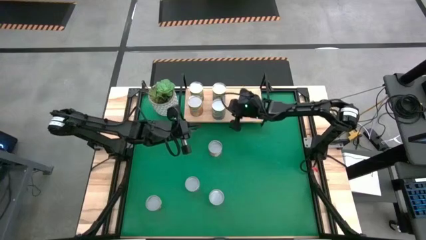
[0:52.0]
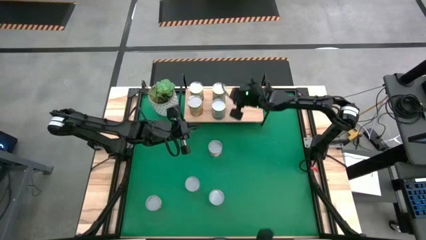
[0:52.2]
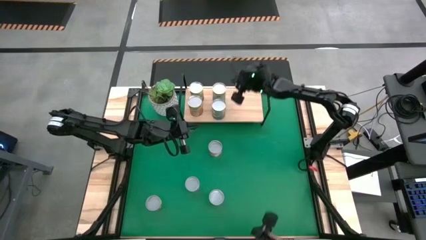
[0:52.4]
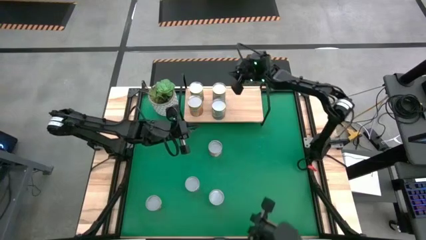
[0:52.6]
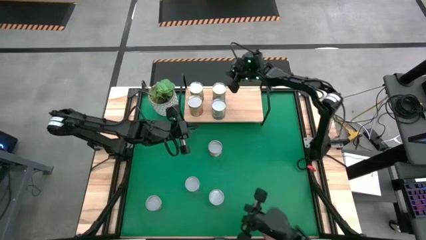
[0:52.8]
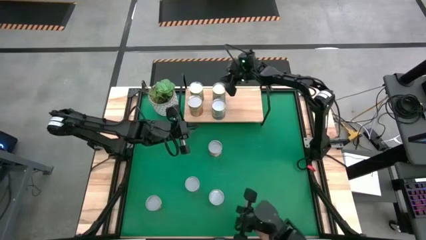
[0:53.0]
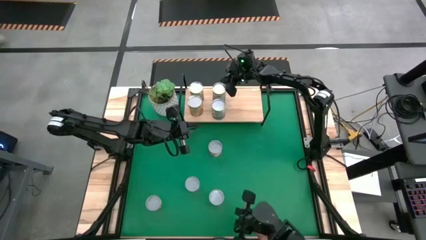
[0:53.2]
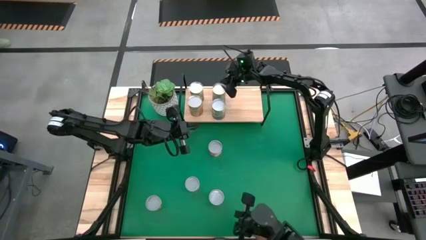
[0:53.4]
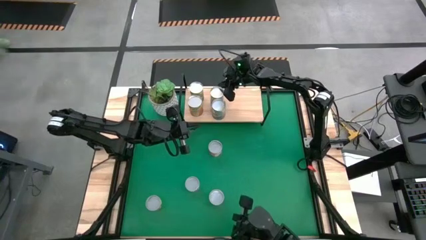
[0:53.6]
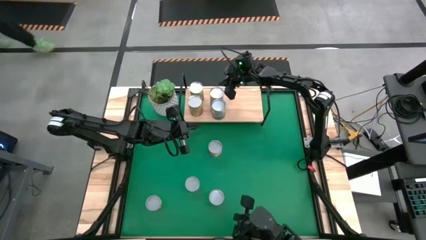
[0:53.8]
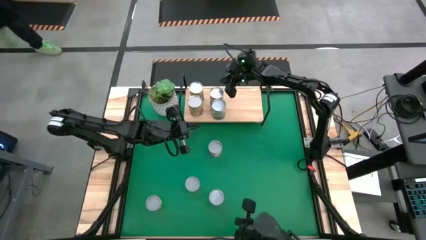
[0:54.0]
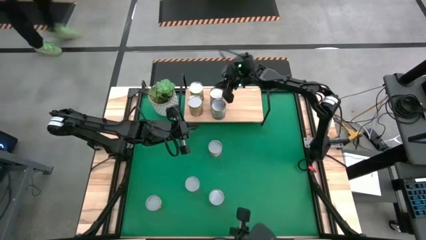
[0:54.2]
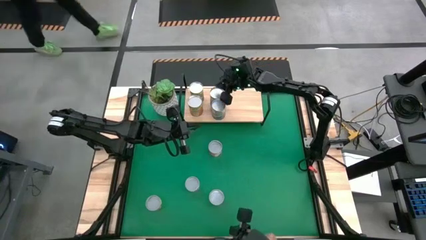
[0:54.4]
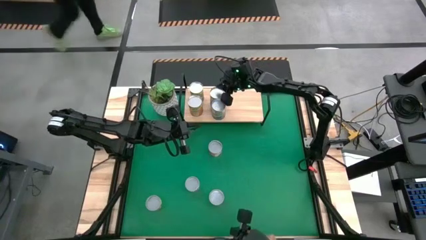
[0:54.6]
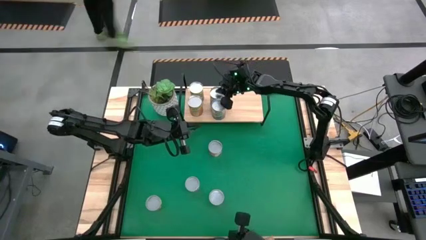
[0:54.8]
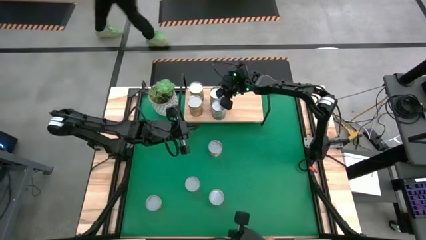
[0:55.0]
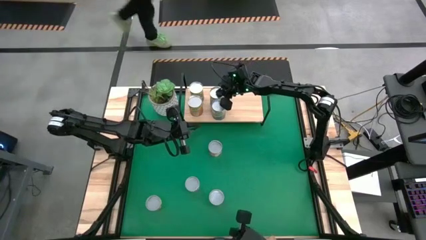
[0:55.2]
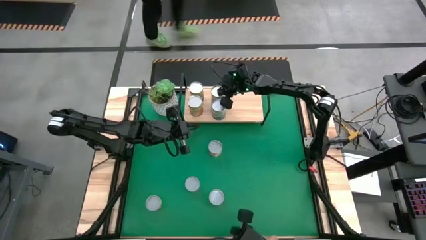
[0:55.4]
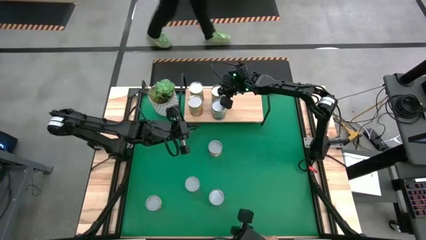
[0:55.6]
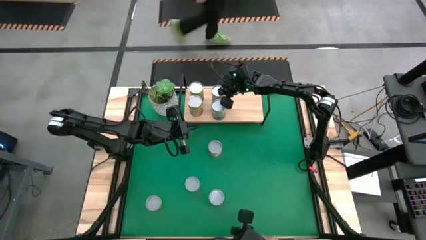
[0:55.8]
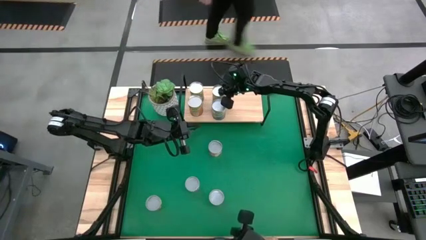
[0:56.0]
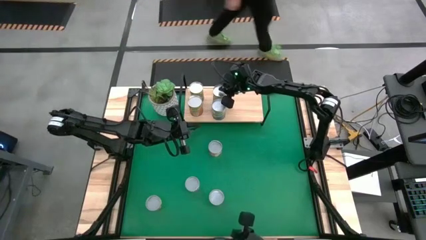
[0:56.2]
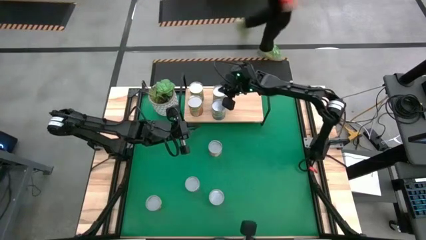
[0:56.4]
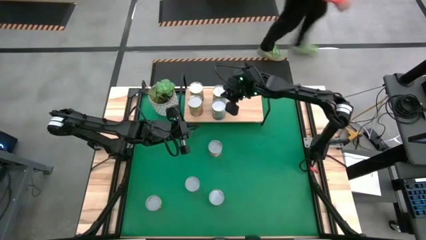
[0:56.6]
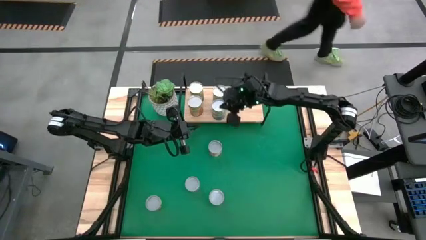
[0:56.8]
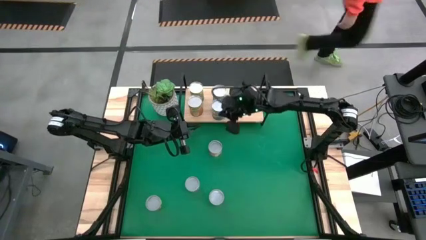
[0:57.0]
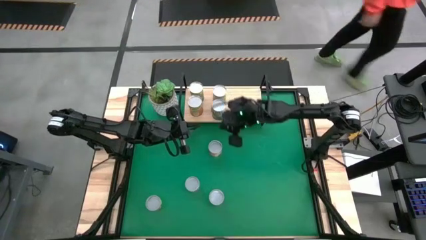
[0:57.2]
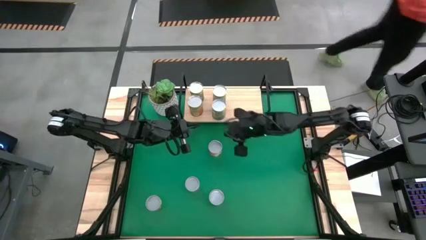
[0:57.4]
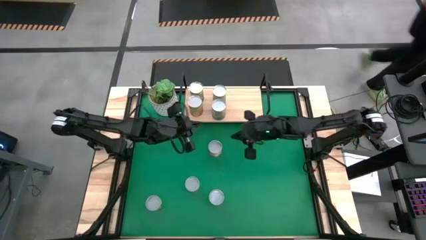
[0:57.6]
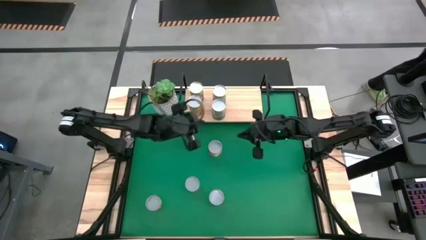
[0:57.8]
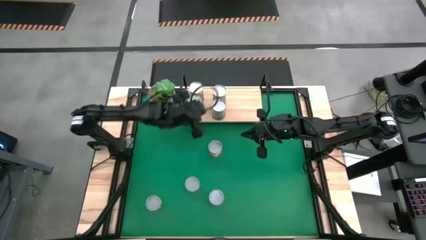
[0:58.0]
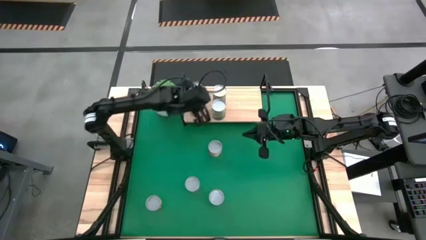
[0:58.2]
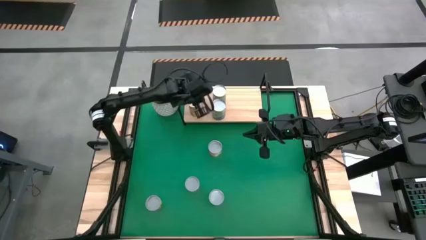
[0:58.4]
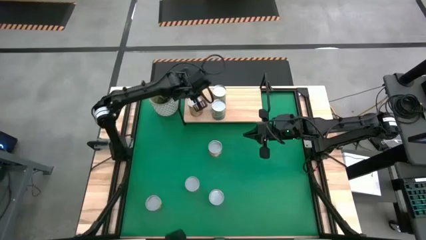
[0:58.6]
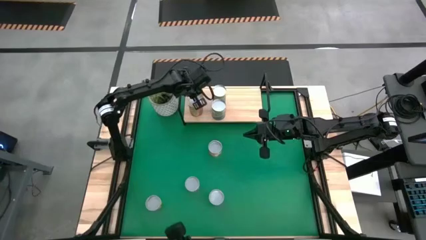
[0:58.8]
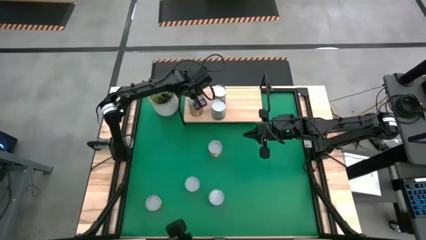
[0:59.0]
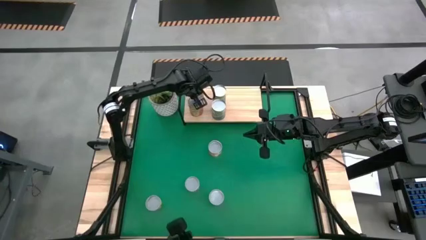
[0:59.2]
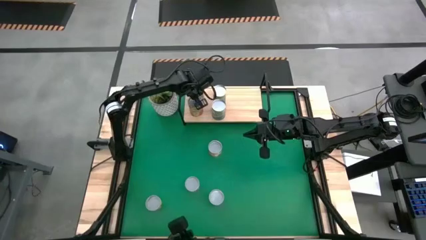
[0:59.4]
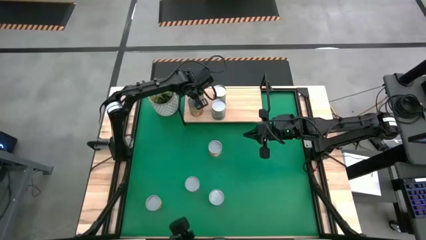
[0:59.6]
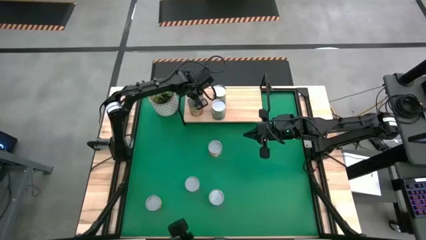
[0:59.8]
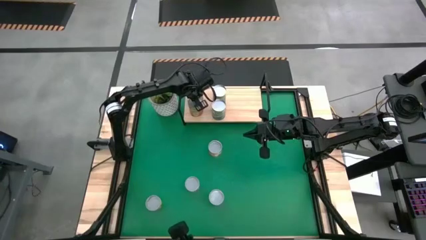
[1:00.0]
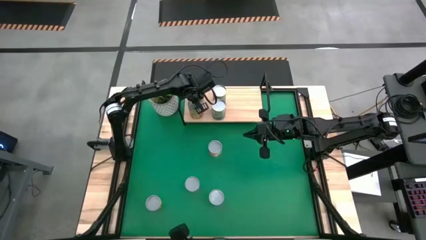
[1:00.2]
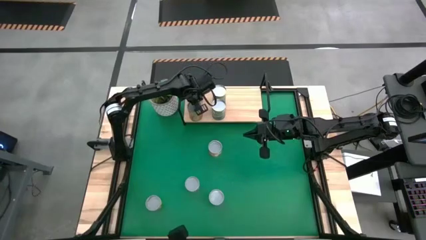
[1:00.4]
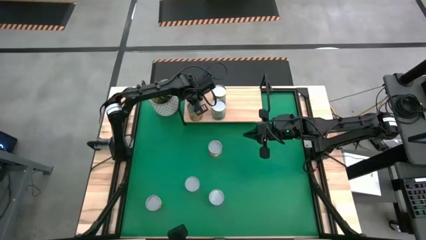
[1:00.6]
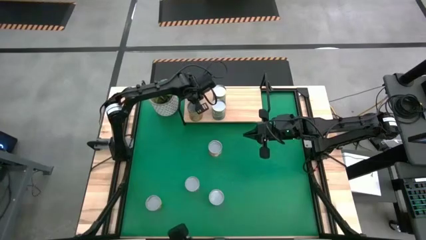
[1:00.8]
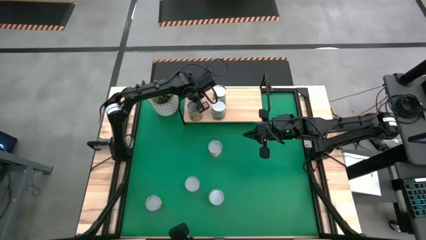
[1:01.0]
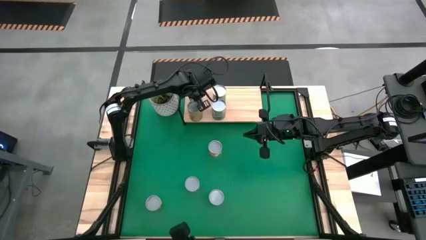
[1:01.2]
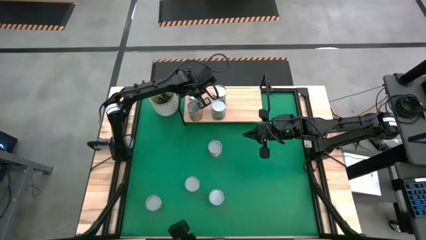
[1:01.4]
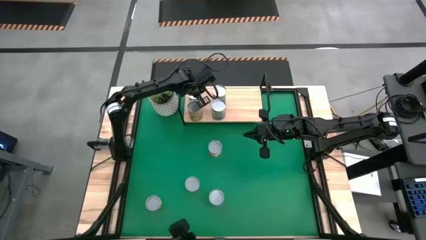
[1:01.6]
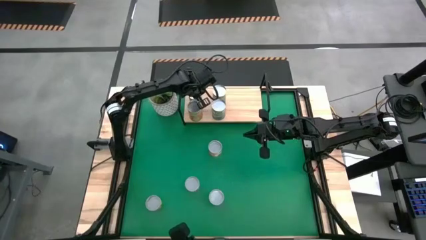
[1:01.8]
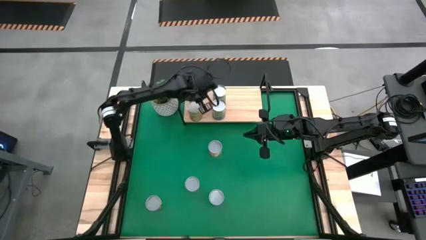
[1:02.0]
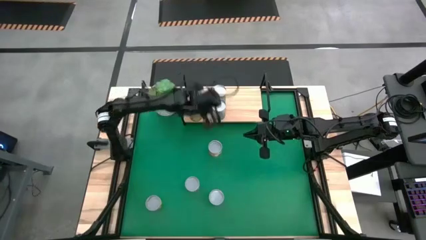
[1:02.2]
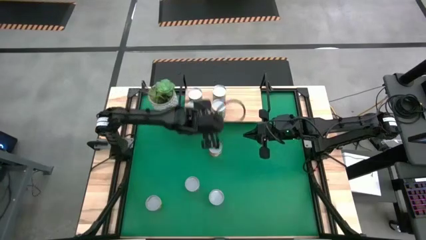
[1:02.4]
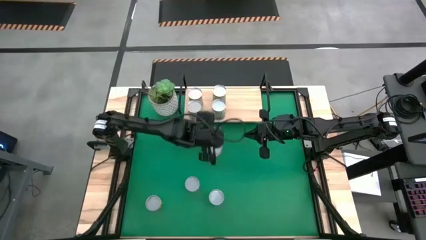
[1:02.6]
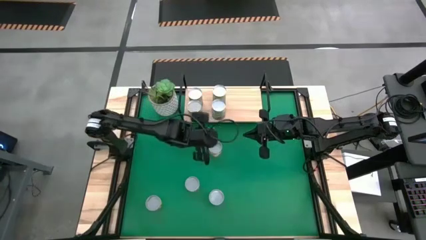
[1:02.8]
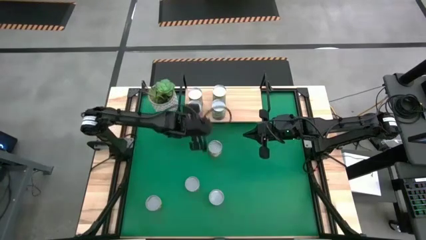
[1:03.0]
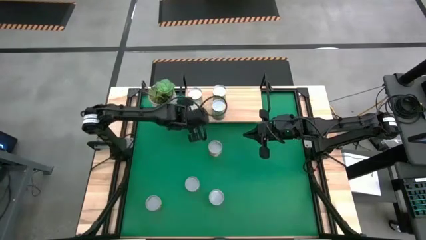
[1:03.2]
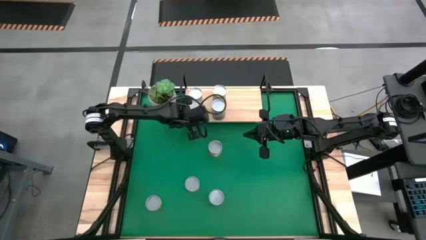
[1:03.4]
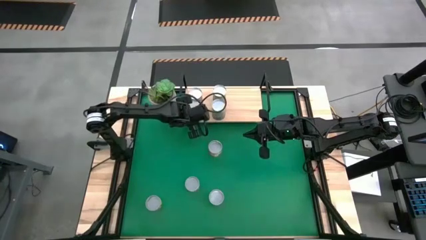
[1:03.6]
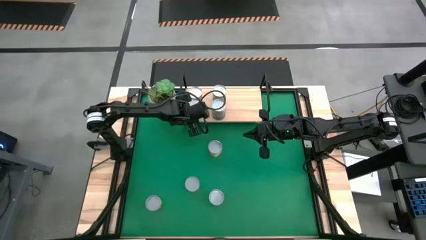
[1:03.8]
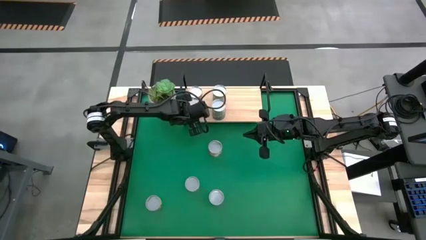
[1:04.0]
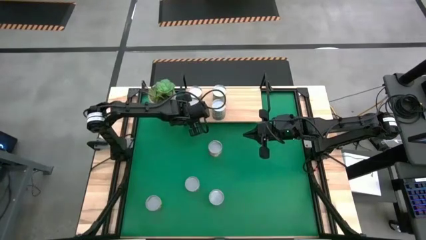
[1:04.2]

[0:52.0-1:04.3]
Task: Pick and place cans onto a shelf
Adjust the canned goods on the shelf

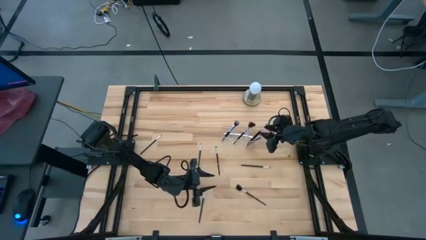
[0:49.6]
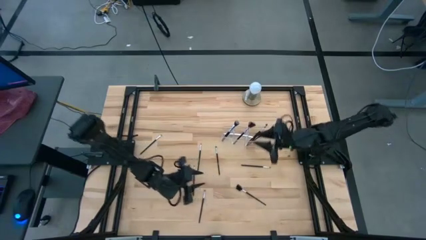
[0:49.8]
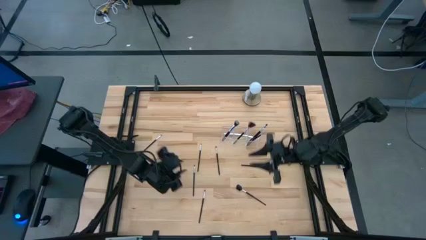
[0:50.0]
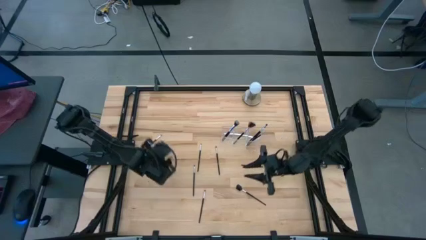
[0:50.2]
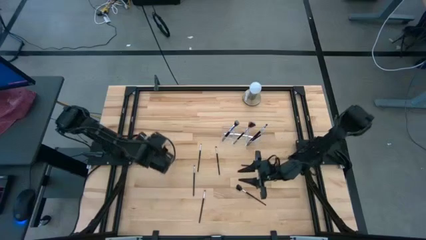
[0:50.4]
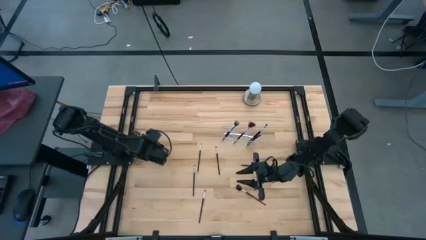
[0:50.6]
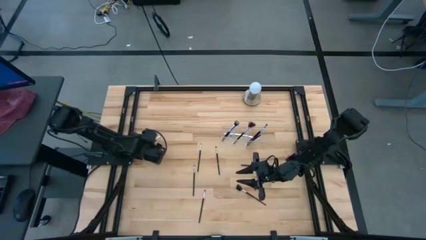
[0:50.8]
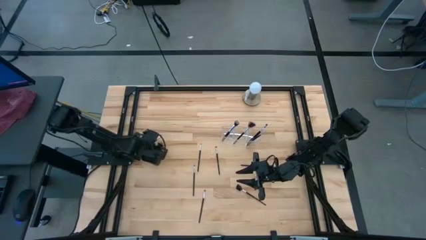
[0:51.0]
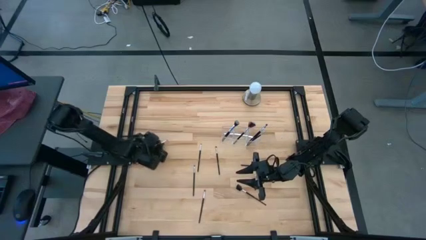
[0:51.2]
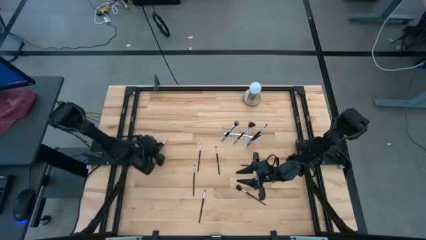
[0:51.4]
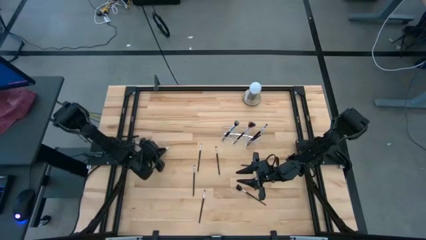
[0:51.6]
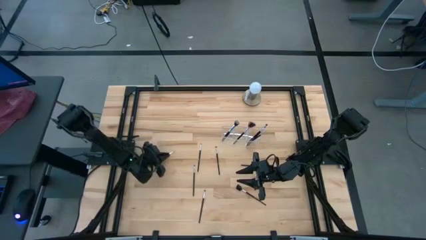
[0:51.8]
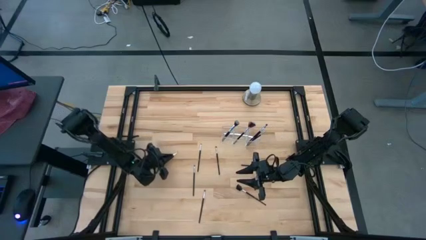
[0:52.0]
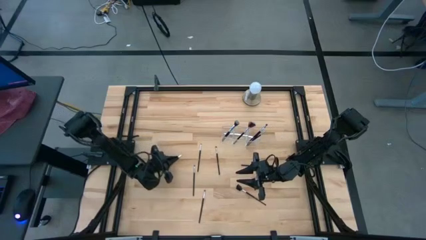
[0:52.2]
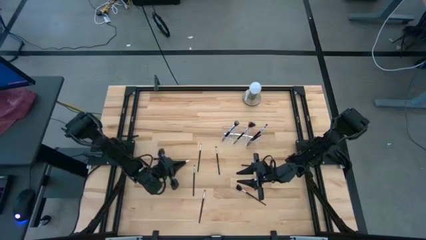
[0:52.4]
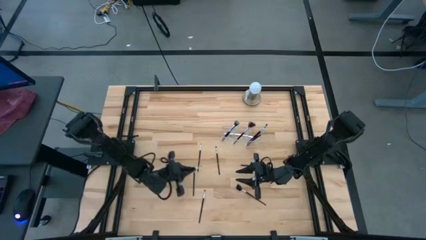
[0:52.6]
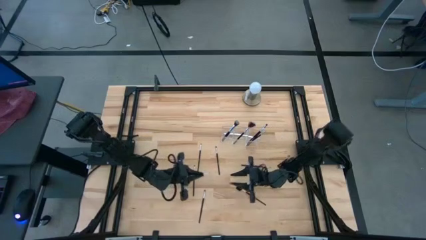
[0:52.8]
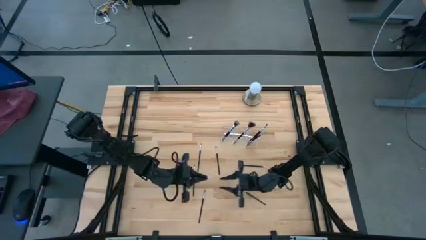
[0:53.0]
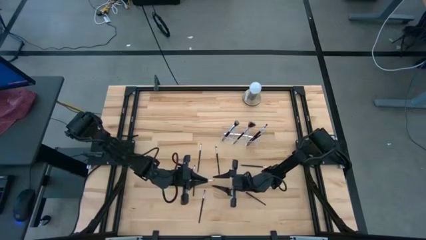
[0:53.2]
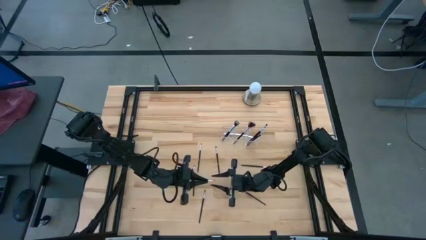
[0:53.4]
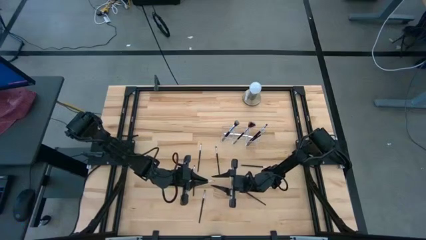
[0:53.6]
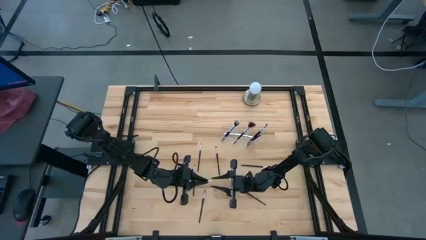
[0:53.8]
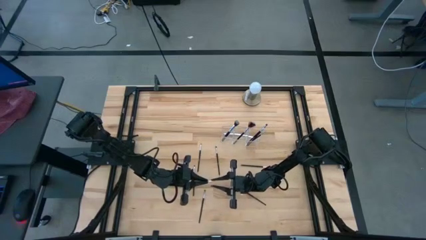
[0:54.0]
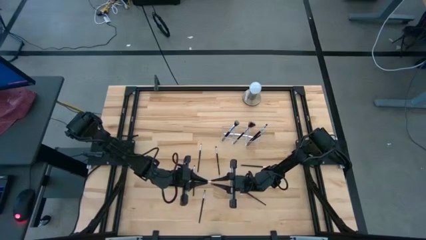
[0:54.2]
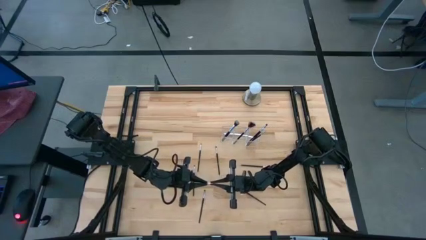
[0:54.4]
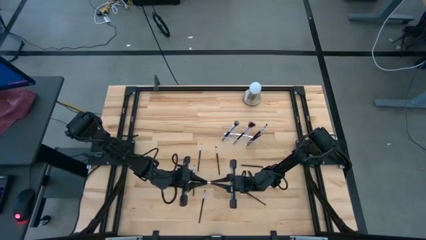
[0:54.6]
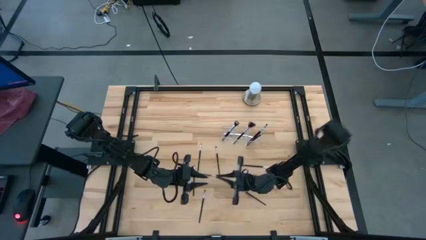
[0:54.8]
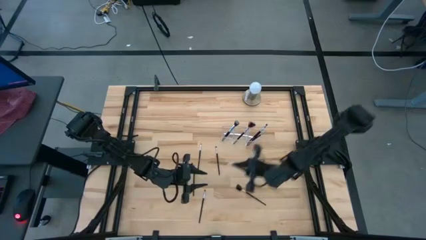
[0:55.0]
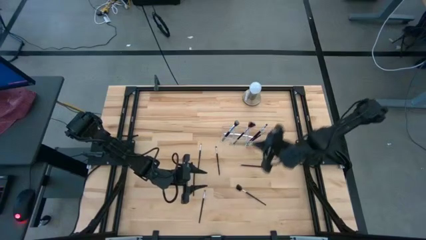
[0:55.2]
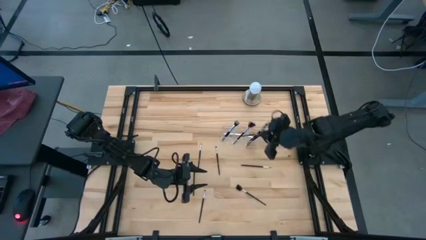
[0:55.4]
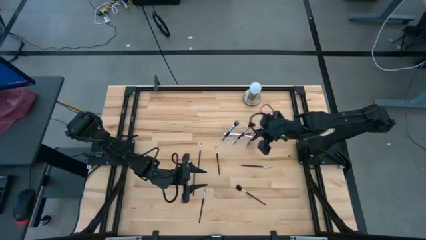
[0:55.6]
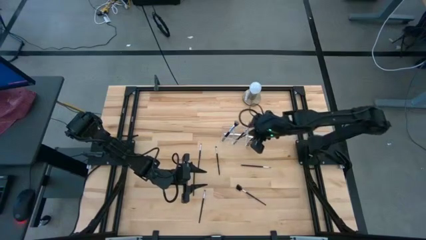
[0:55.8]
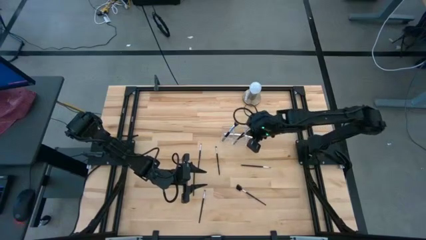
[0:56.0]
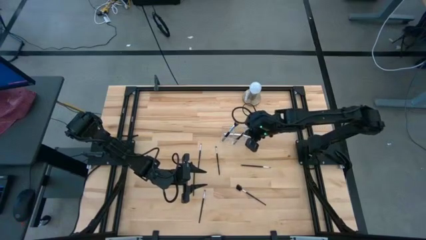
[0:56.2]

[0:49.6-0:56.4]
Task: Put items in baskets/containers
Put the black eyeshadow brush into the transparent organizer
